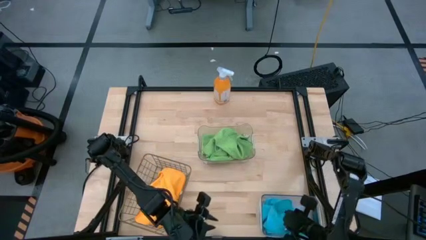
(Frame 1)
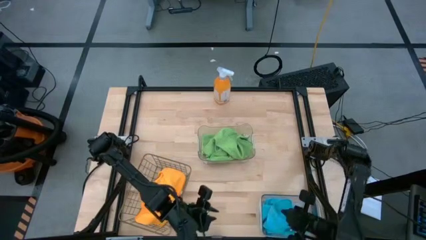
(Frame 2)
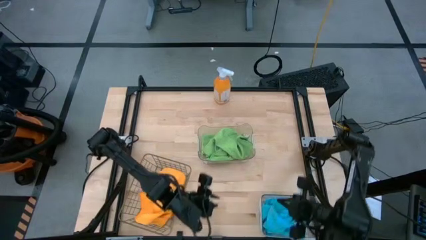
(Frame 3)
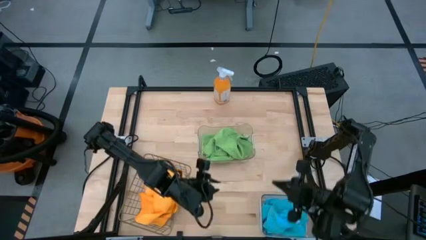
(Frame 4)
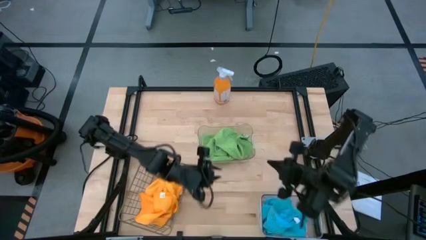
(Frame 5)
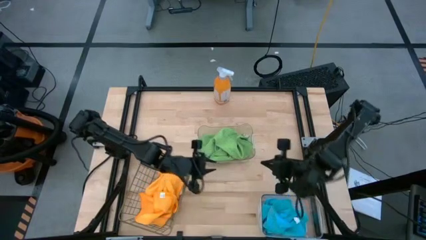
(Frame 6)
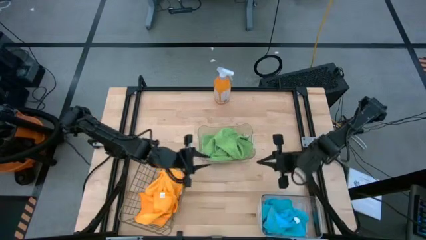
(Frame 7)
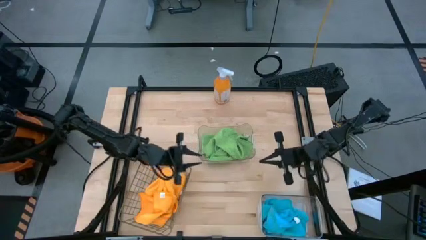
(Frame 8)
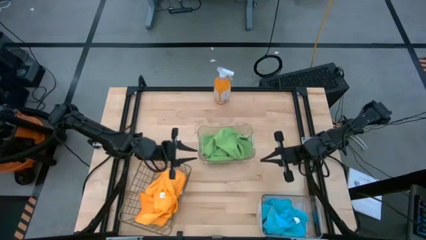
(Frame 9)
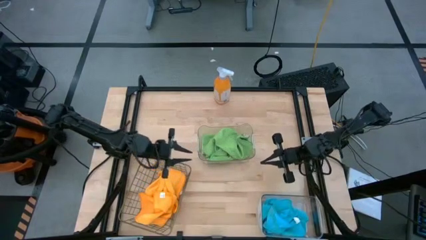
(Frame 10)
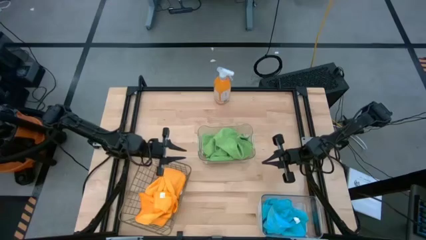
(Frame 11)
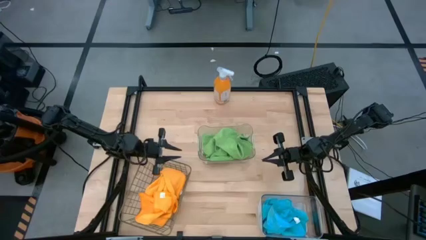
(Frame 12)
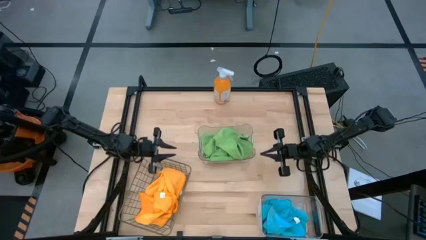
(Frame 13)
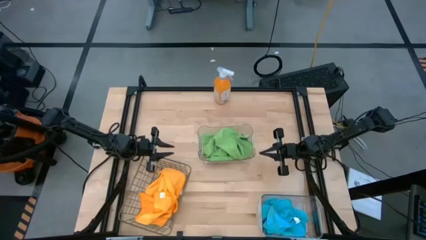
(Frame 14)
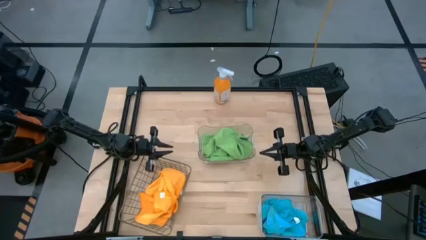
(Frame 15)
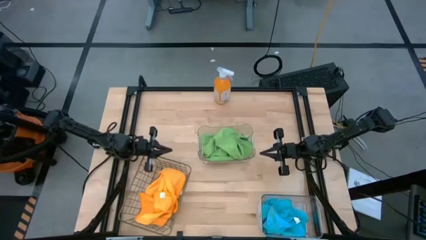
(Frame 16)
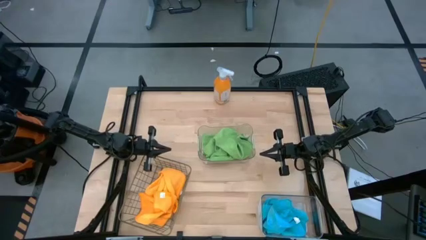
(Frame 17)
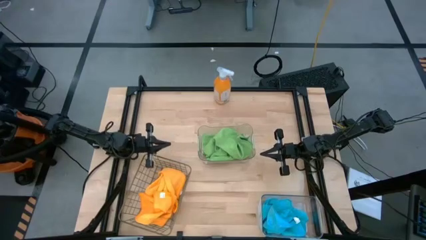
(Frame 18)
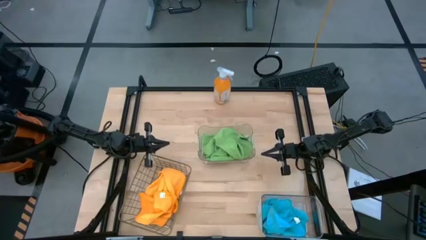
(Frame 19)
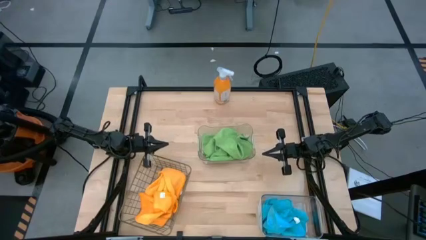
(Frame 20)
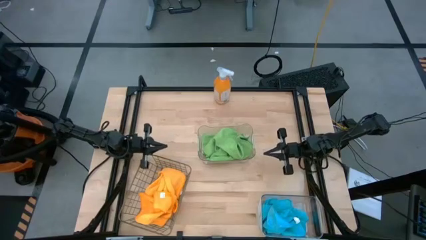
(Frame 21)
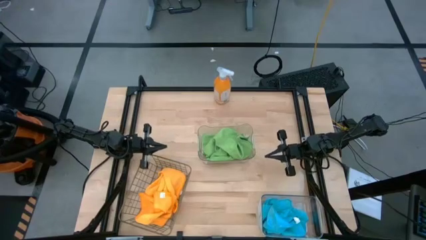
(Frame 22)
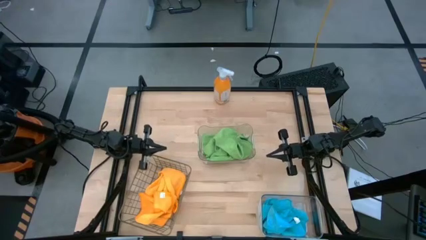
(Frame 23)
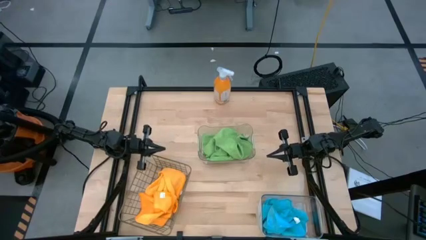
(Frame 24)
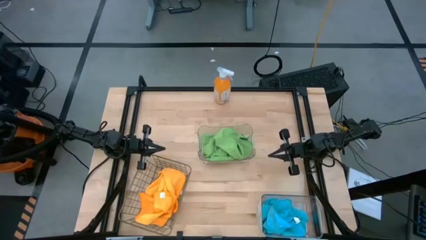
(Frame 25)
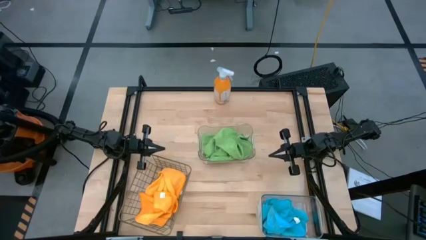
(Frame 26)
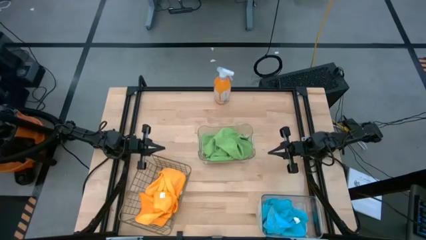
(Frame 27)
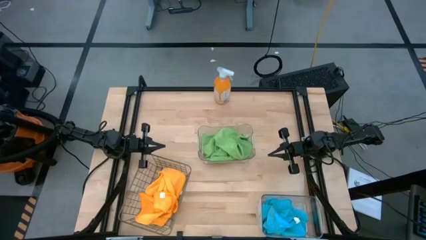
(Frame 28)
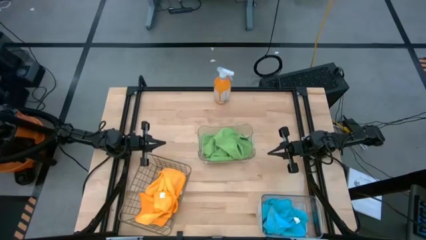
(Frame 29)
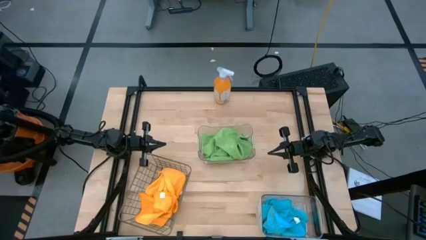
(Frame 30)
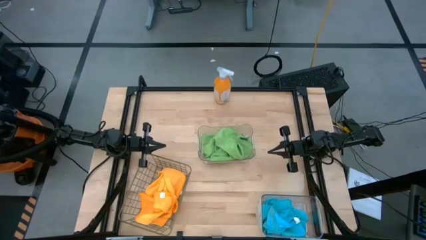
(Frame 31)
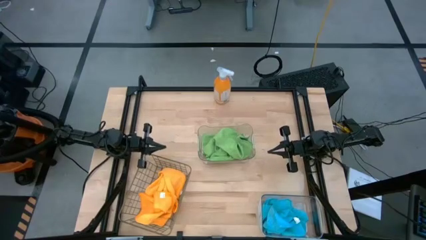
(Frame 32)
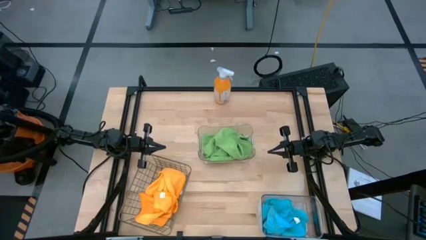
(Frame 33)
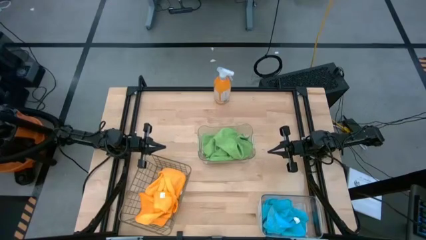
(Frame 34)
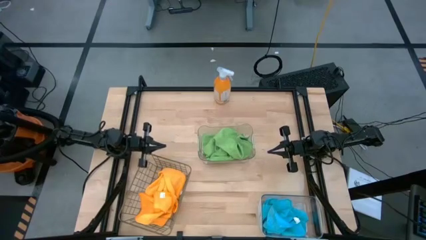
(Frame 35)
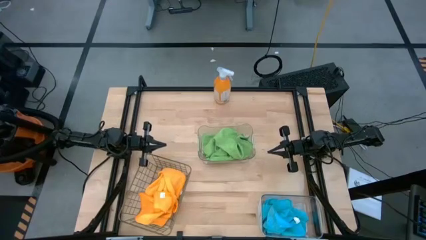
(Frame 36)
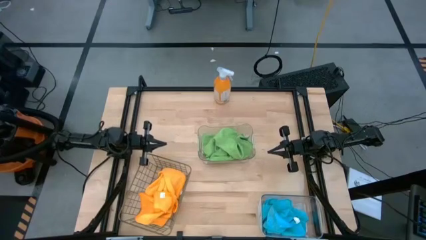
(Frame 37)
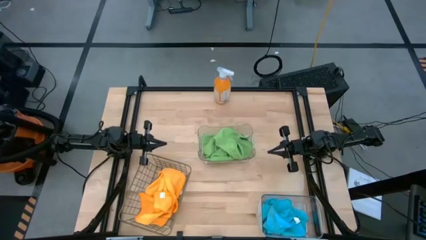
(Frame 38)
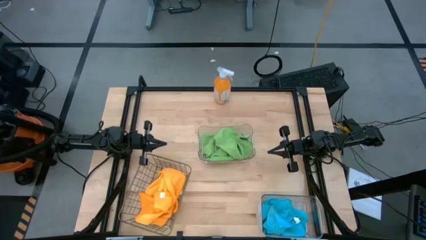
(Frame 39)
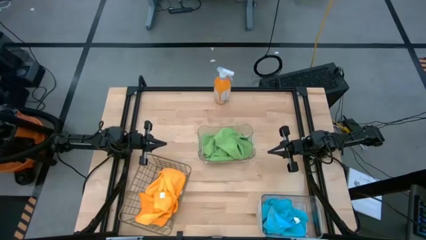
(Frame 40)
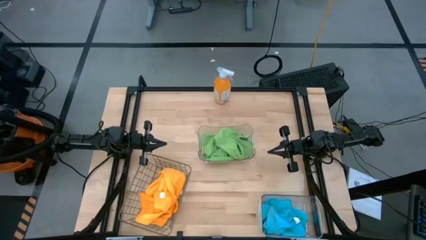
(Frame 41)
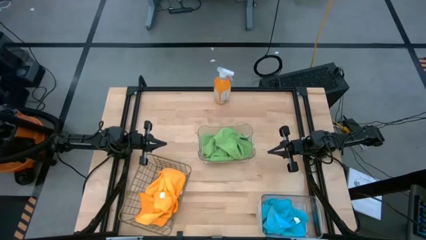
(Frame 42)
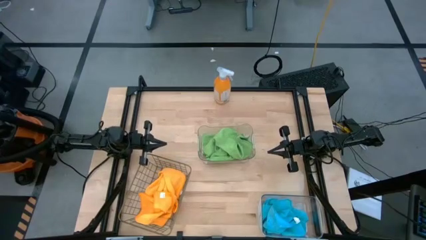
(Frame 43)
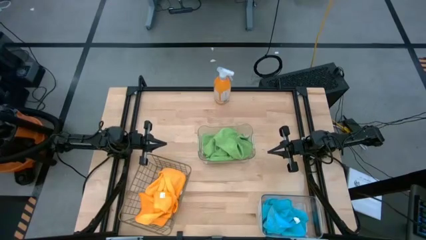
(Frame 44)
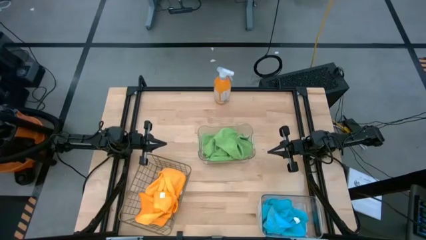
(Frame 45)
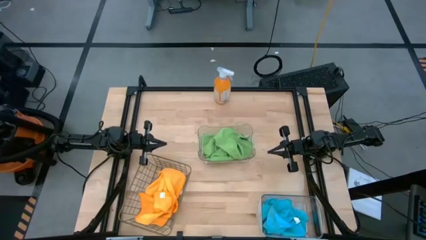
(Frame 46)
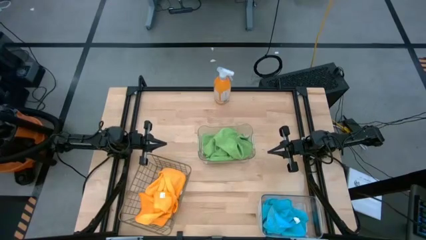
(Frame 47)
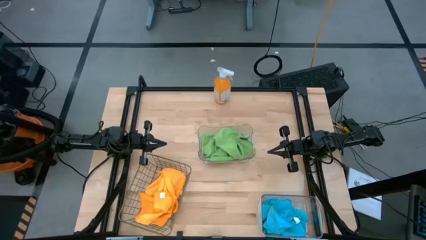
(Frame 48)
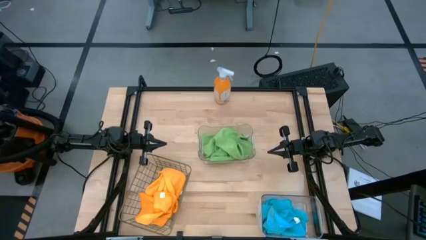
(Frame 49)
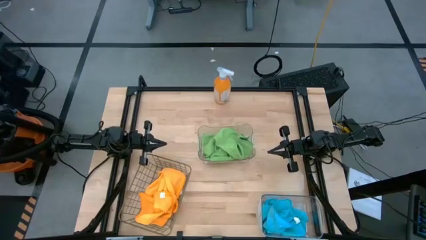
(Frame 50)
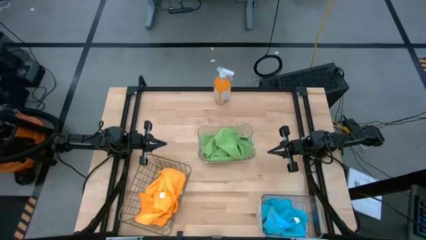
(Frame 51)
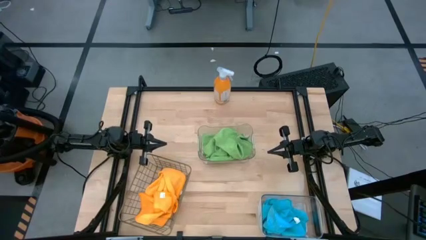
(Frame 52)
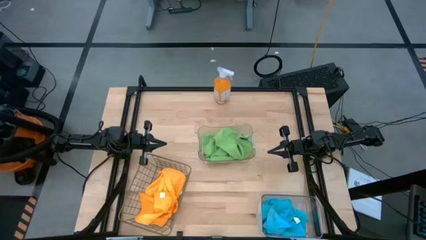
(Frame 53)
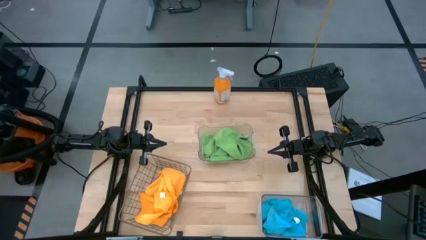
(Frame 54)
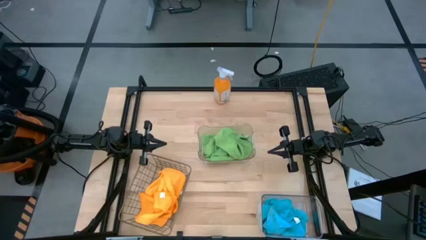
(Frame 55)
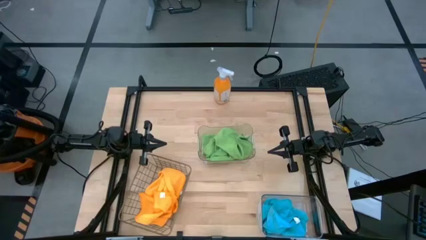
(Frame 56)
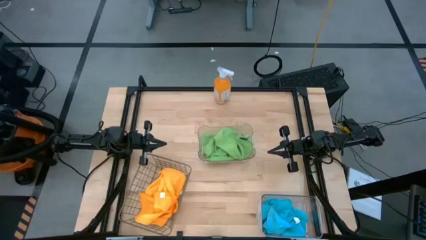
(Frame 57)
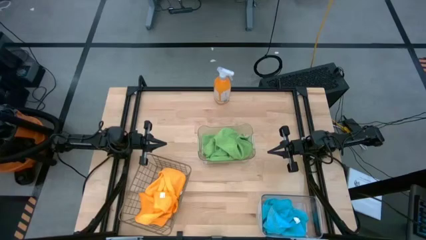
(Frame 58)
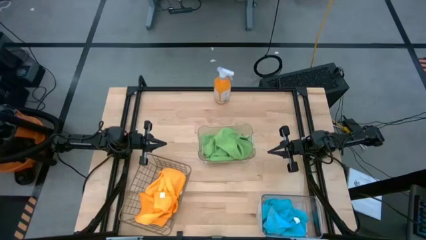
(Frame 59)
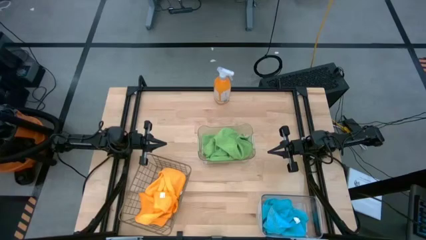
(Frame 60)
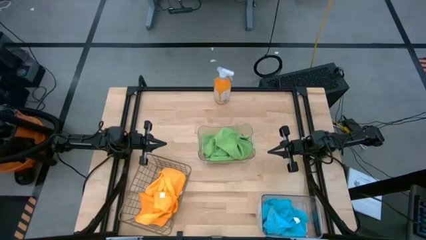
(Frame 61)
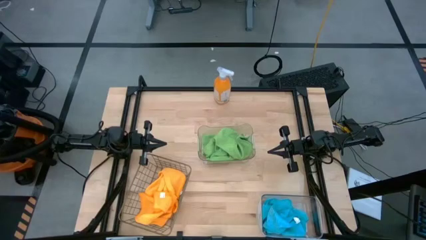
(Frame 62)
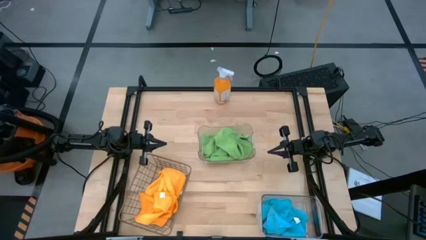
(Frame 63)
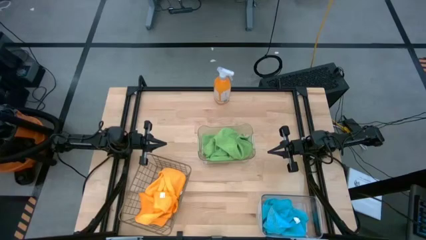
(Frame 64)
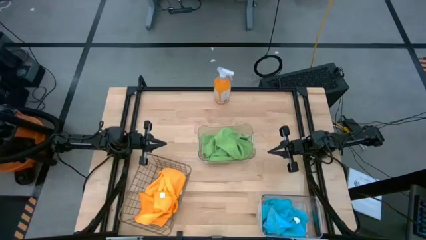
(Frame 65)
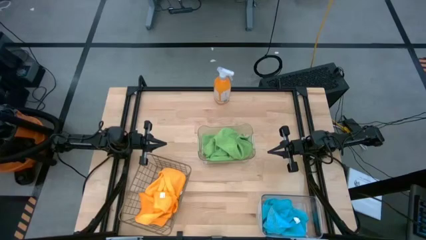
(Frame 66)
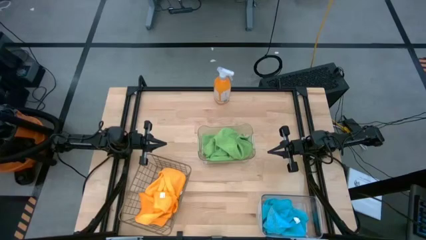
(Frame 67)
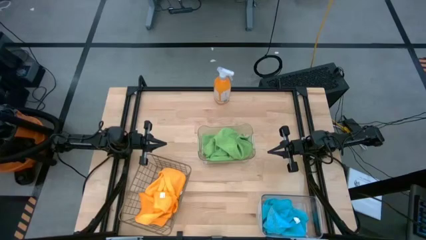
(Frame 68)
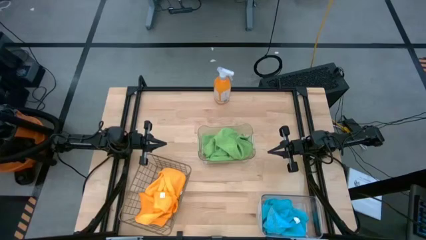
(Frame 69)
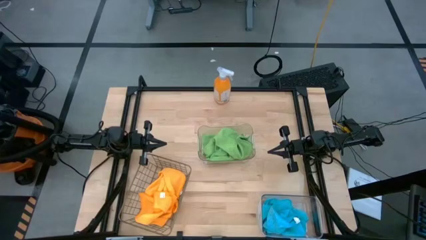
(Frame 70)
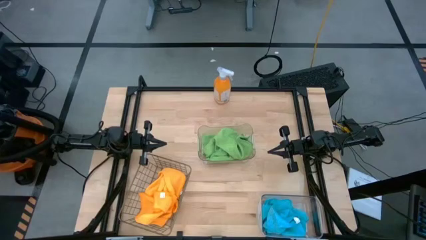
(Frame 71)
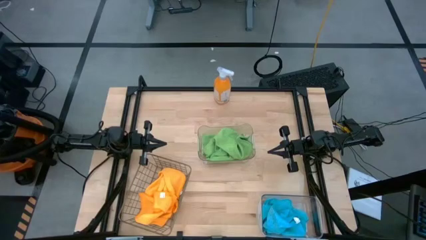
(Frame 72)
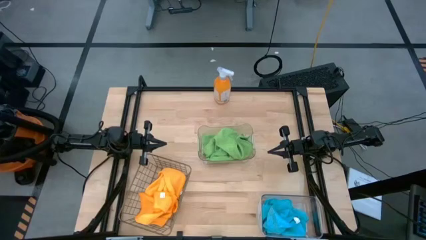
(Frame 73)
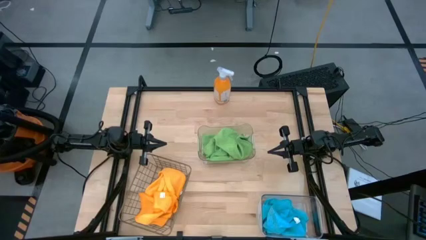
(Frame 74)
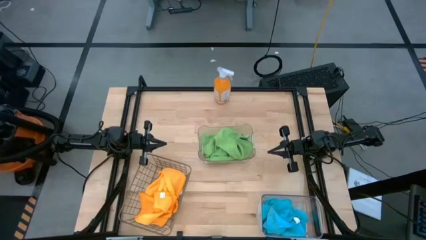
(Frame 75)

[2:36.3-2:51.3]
Task: Sort microfiber towel by color & place in baskets
Return to Home Position

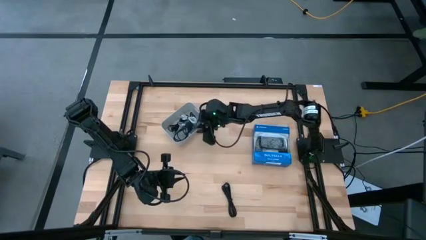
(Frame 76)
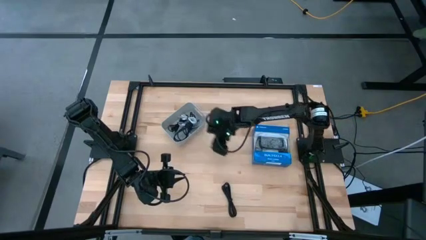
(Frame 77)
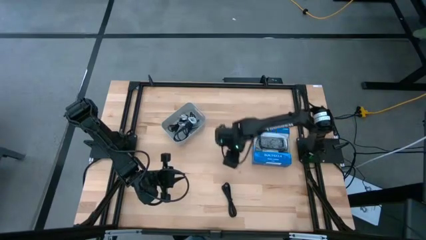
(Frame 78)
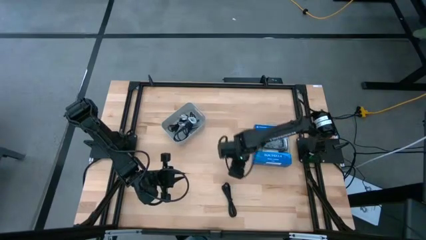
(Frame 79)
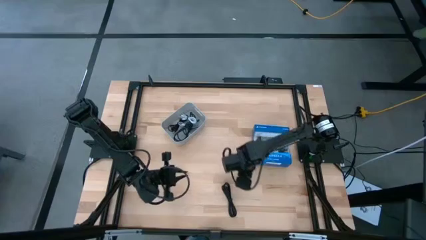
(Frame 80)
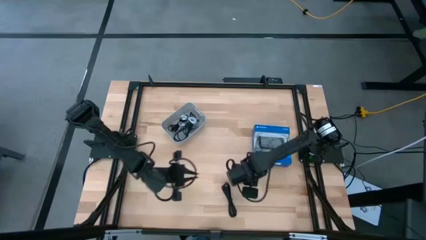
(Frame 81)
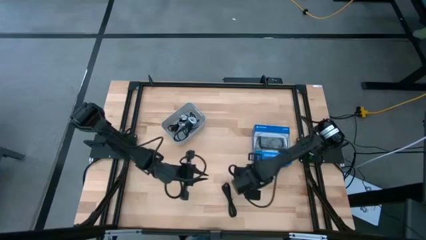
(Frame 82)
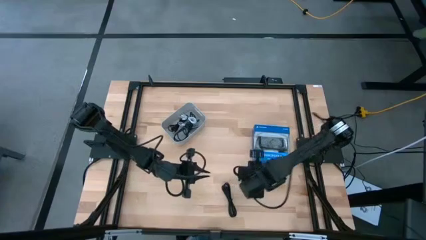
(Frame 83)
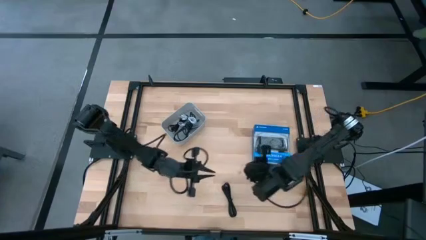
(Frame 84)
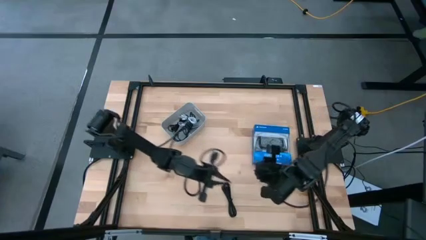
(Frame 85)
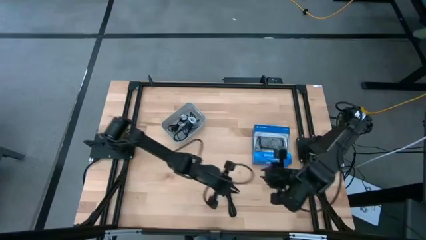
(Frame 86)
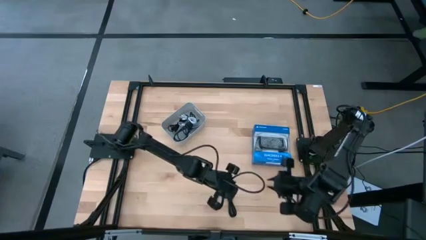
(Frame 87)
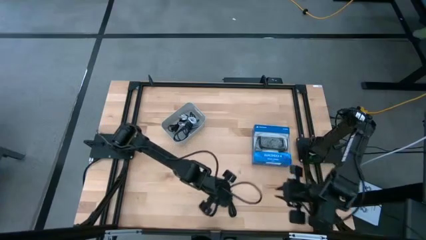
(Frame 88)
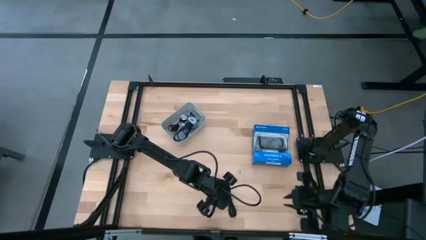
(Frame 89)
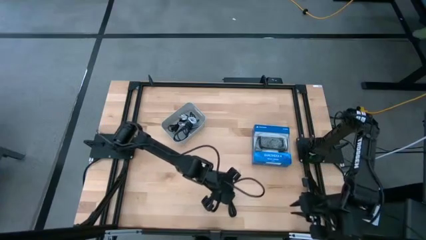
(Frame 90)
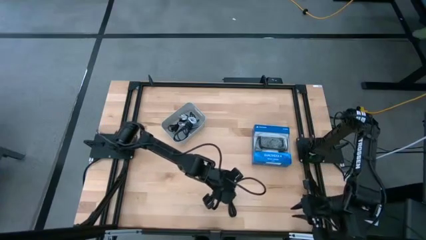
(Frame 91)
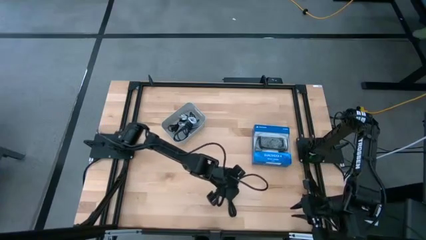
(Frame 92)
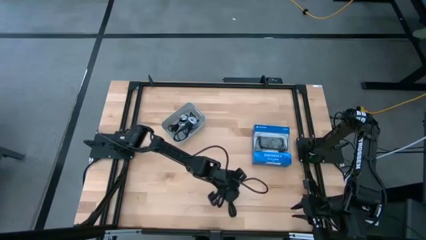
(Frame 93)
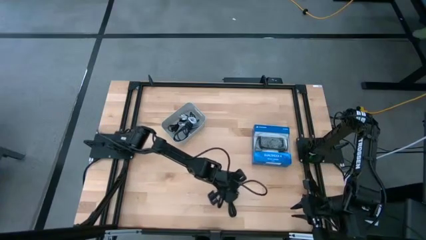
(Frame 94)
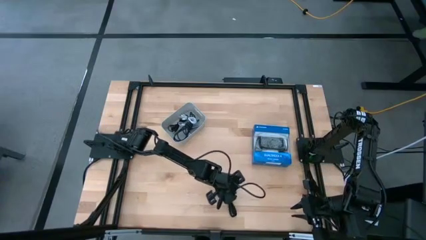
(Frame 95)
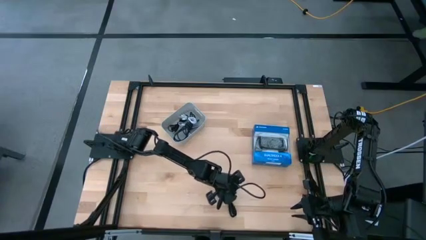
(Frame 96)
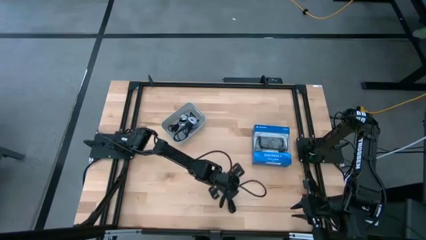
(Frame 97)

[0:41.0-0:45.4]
Task: Pick and place USB-C Cables
Put the black charger cable into the white bin
